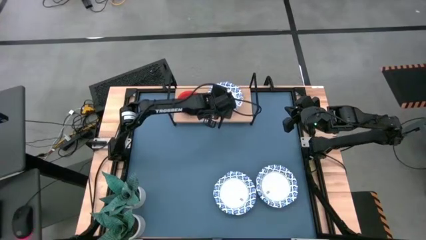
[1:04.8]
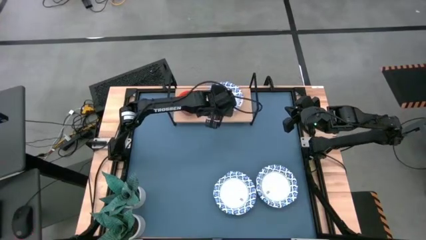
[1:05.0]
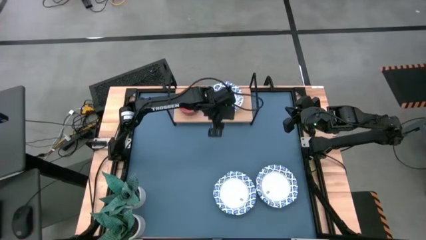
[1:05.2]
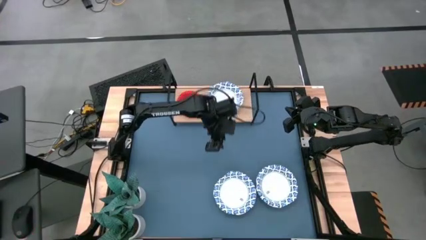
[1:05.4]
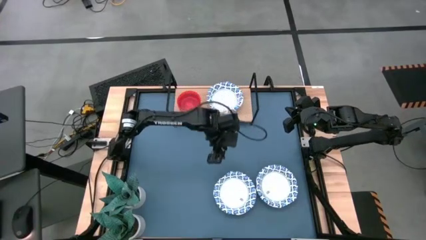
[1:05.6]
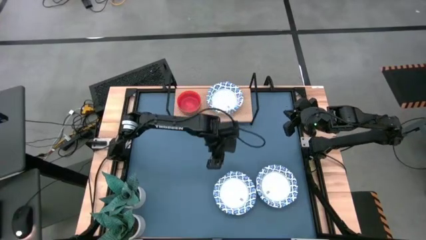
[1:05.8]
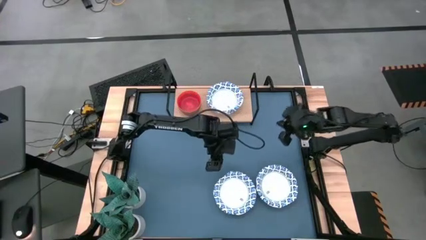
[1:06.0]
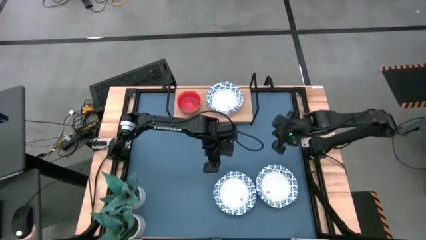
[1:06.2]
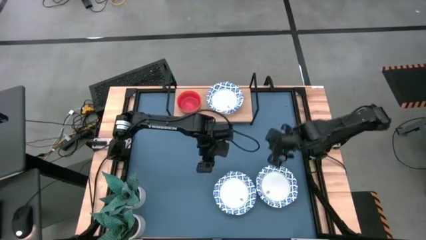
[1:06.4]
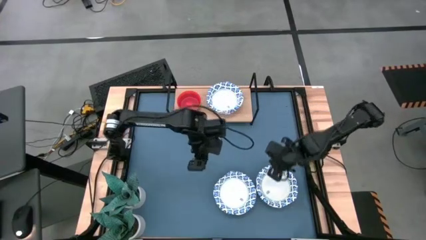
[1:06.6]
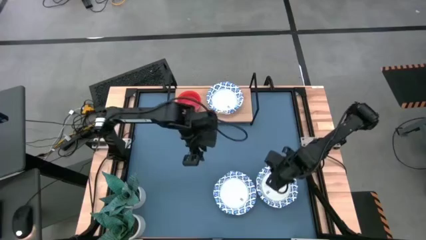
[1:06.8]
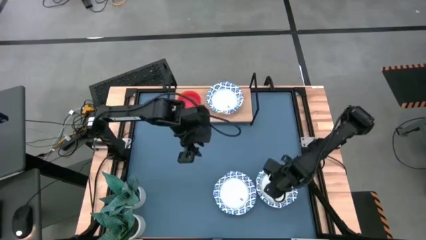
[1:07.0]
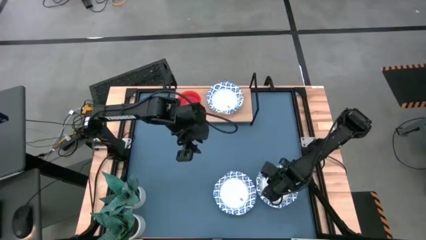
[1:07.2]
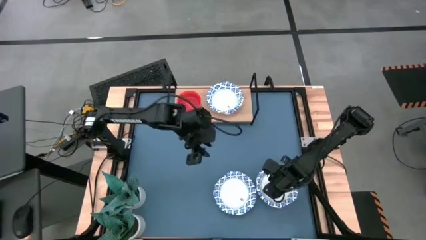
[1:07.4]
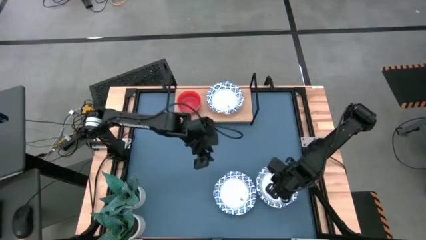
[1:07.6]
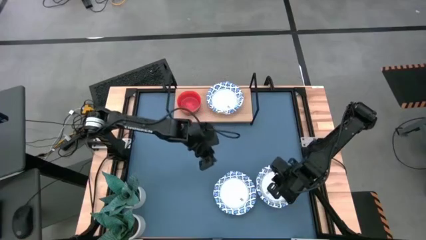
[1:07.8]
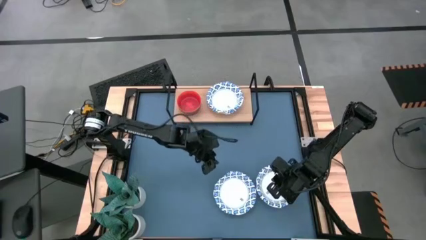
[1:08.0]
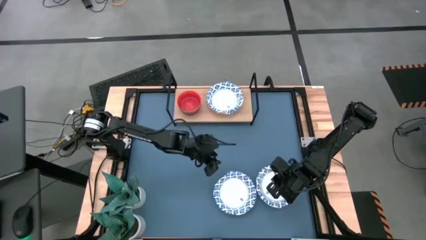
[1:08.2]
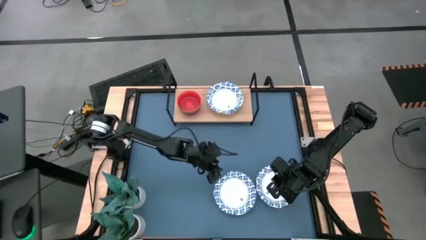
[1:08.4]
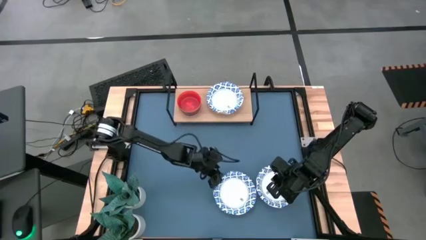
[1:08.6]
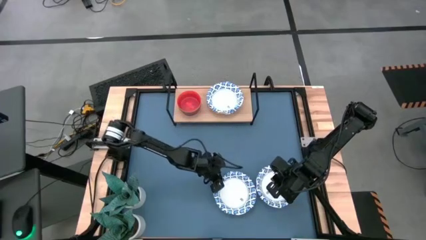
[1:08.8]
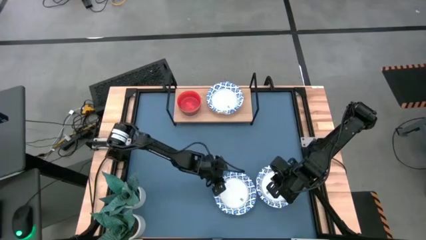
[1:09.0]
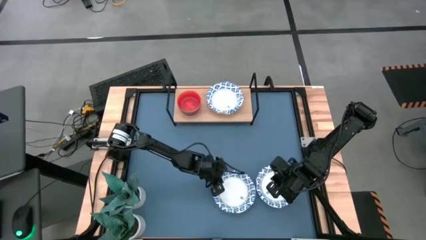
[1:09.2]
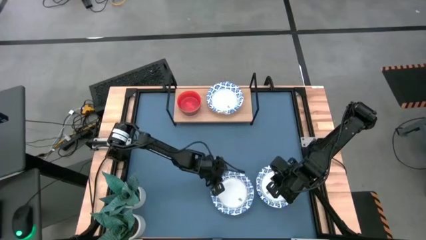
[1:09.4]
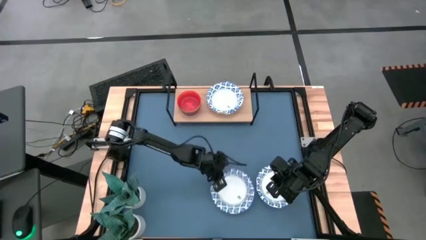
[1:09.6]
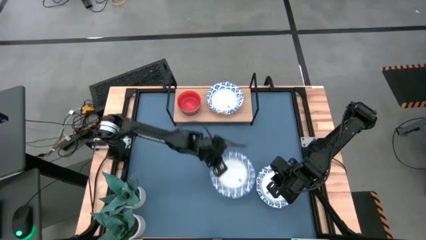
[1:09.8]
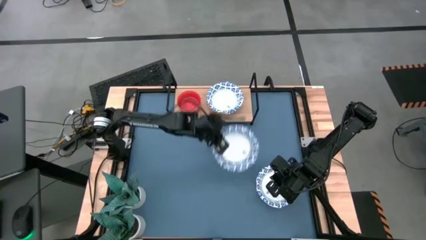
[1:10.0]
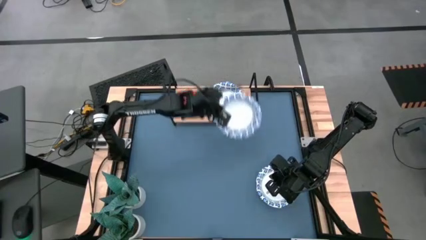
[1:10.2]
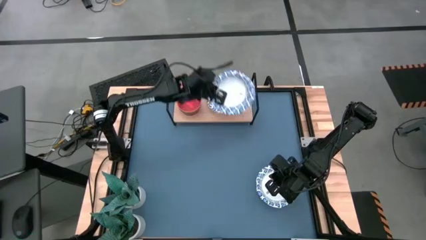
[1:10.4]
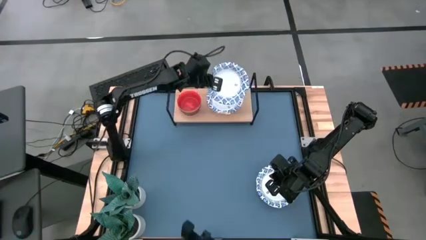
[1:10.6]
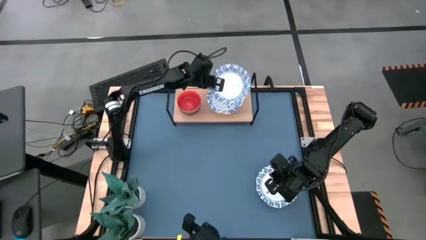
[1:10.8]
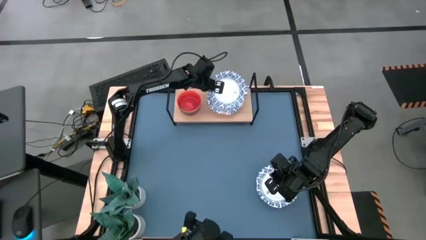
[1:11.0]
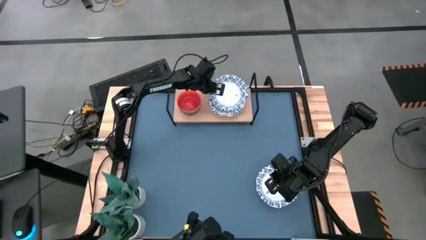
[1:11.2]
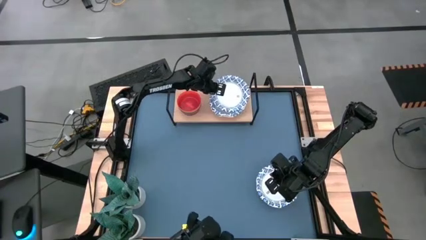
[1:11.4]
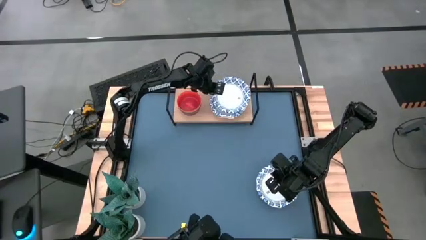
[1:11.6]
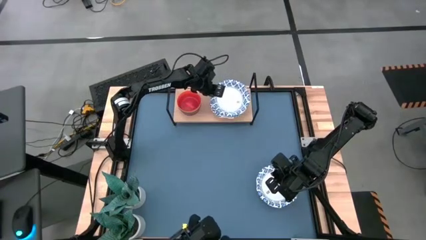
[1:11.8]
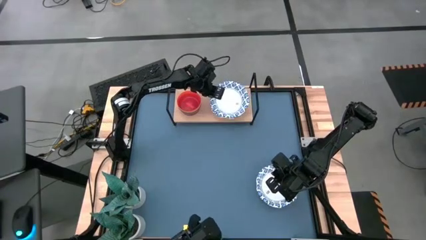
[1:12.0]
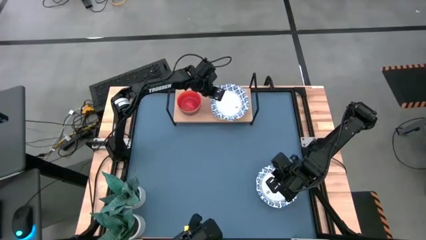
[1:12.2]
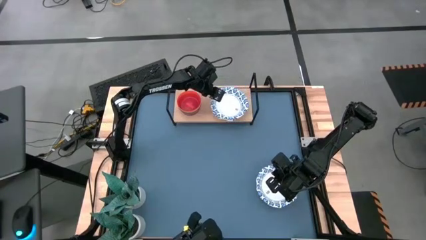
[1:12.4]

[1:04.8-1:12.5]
Task: Place and stack bowls onto a shelf
Stack the left blue patterned paper bowl into the blue patterned paper bowl on the shelf

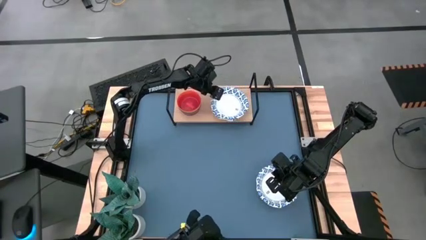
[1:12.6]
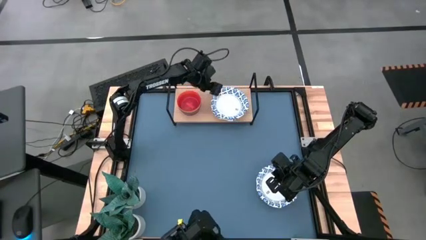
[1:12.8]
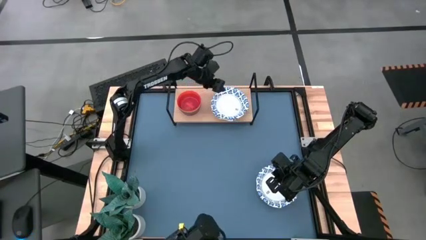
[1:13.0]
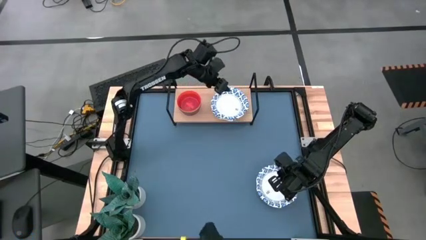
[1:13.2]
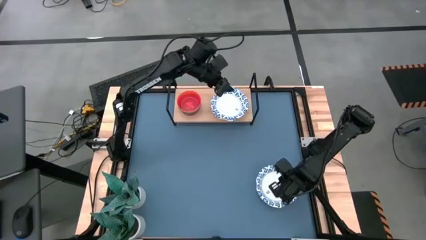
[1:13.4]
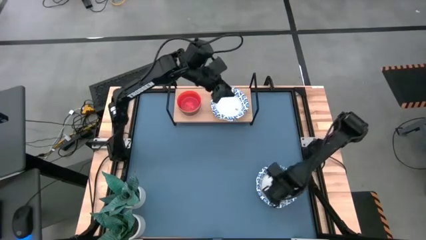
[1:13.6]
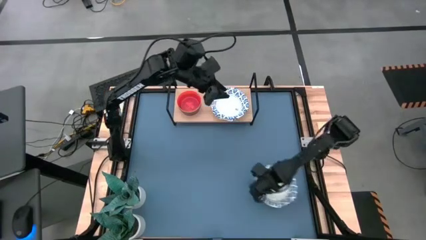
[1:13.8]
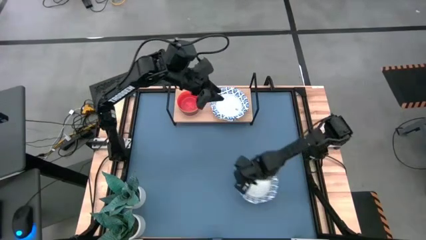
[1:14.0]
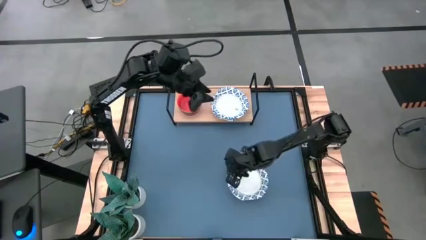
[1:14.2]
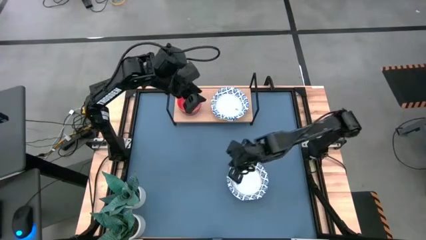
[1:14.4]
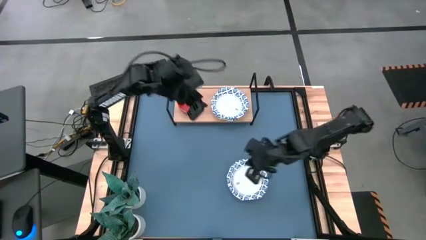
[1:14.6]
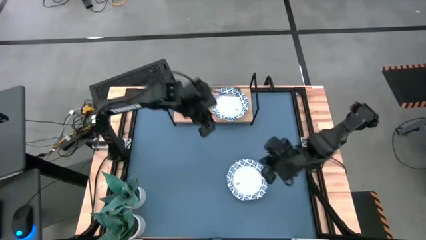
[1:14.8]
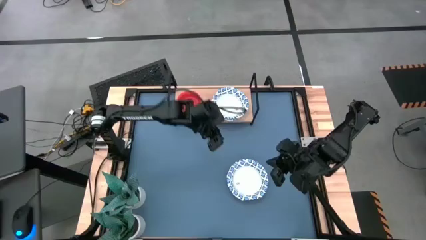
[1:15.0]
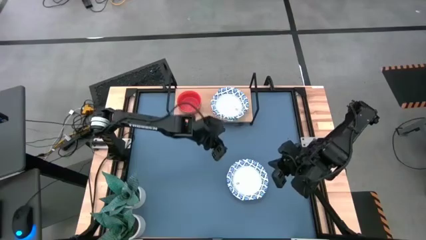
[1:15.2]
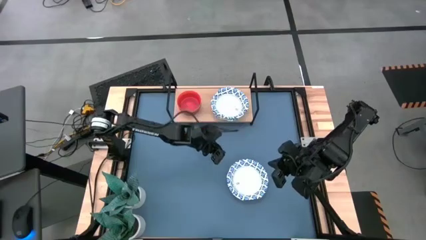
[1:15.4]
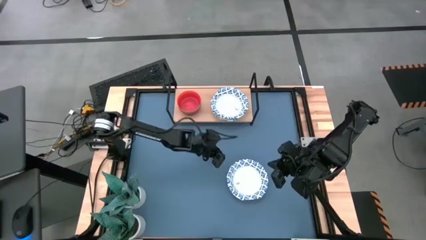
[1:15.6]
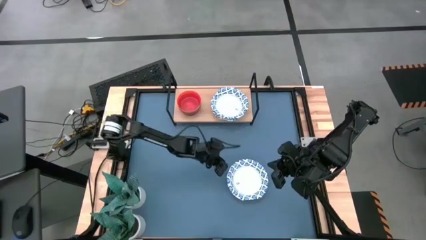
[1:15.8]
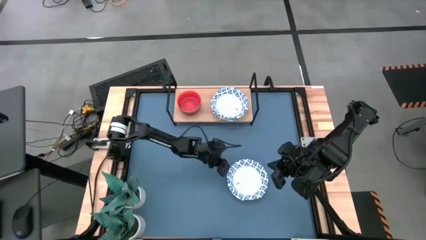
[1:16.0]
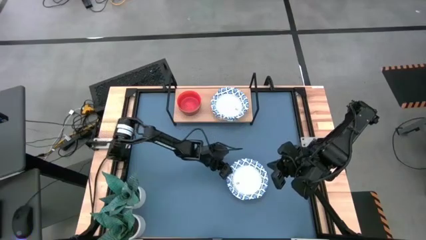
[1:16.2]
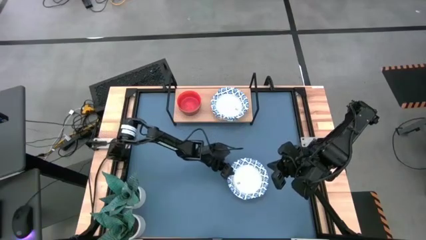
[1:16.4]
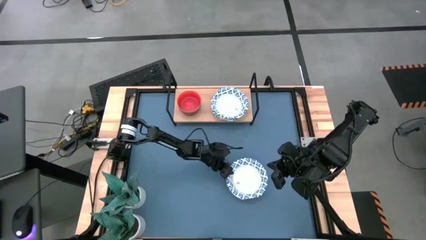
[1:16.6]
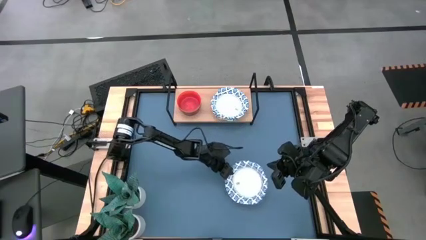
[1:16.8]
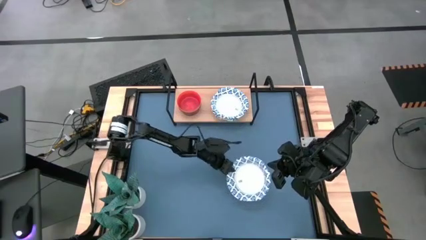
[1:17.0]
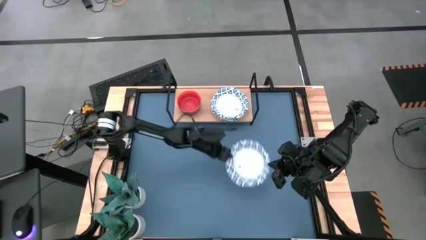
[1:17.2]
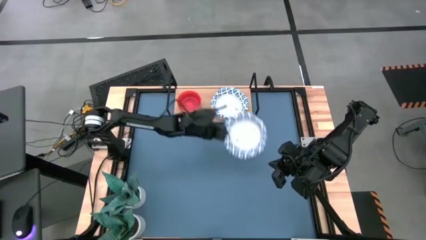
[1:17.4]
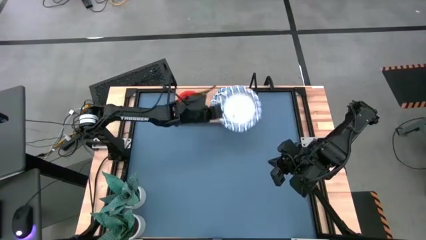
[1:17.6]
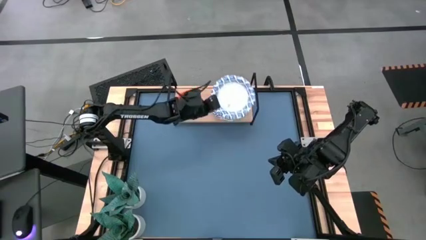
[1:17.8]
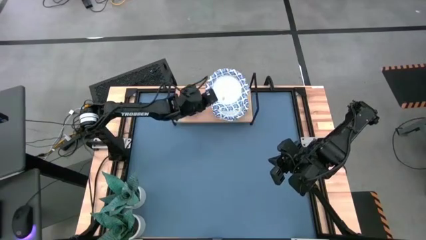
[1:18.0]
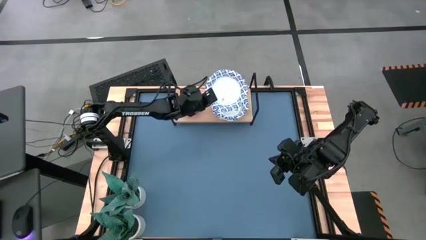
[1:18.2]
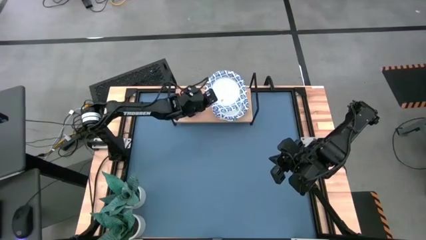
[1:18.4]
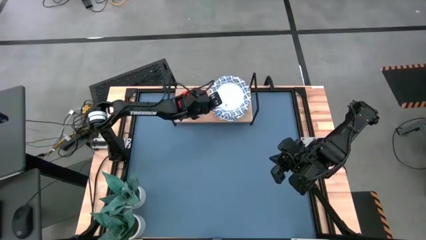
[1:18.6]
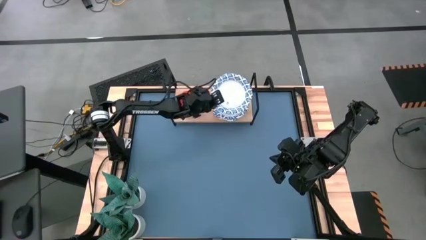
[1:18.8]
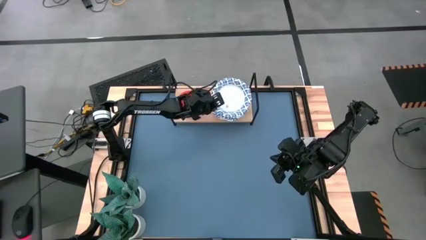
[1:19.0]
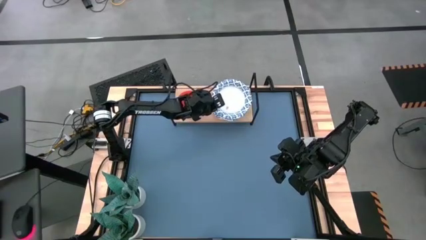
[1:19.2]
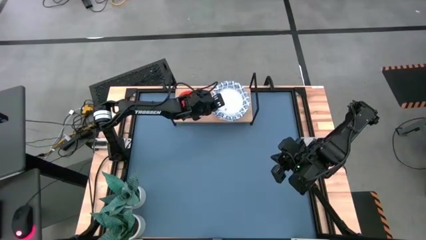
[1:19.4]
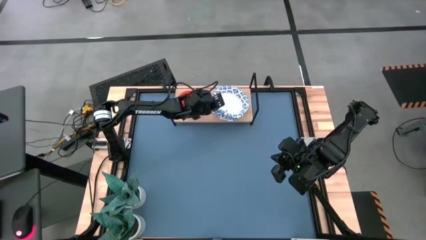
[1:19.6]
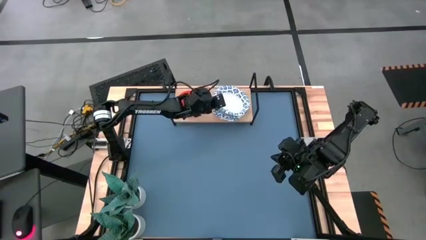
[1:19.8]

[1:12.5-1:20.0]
Stack the blue patterned paper bowl into the blue patterned paper bowl on the shelf
